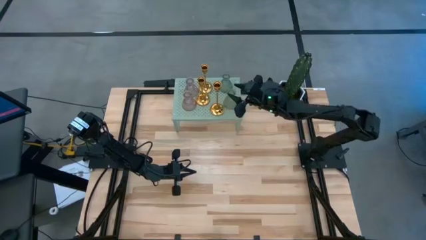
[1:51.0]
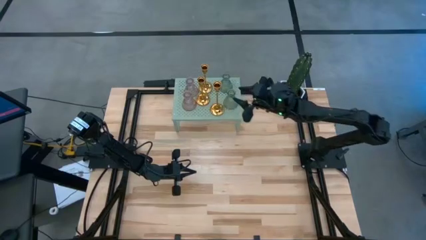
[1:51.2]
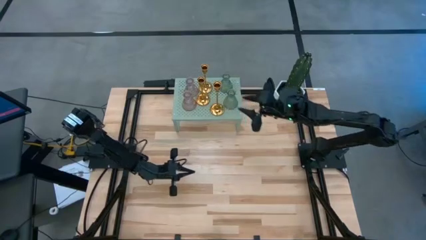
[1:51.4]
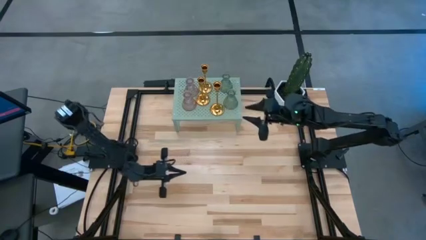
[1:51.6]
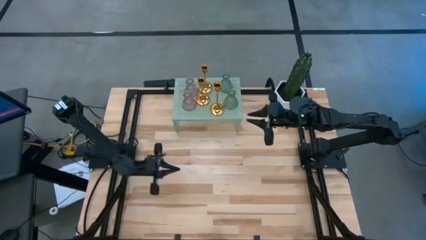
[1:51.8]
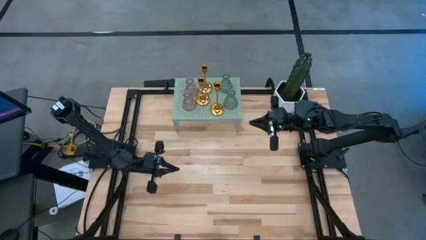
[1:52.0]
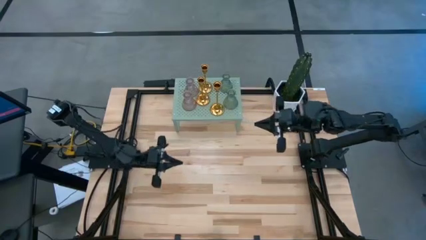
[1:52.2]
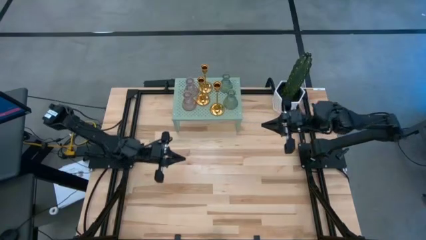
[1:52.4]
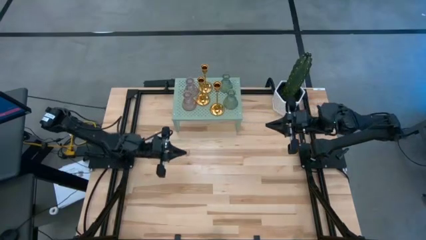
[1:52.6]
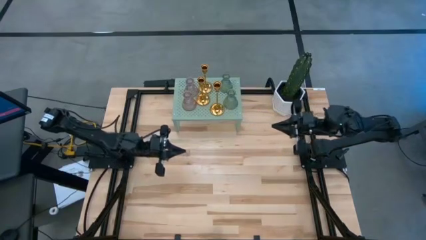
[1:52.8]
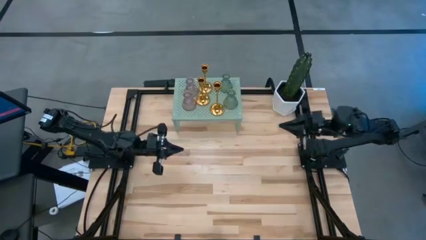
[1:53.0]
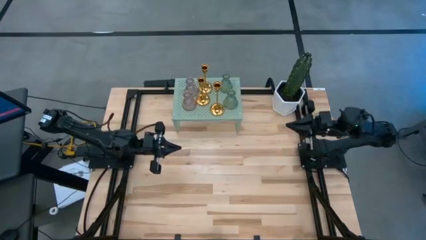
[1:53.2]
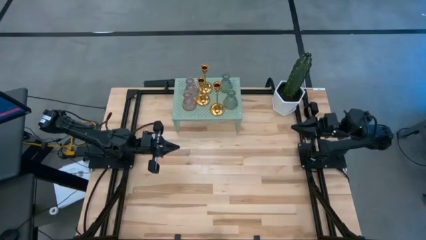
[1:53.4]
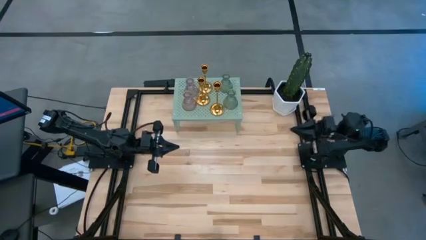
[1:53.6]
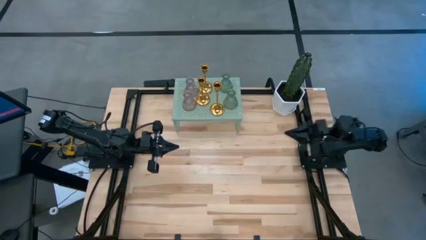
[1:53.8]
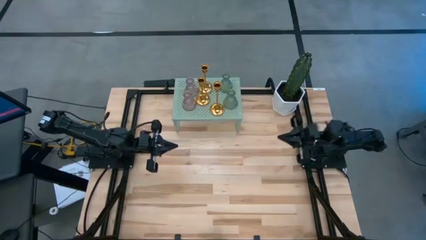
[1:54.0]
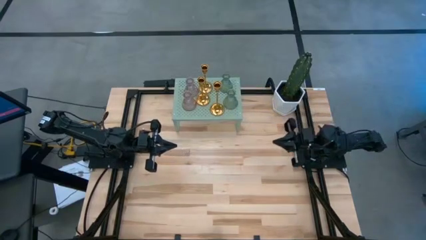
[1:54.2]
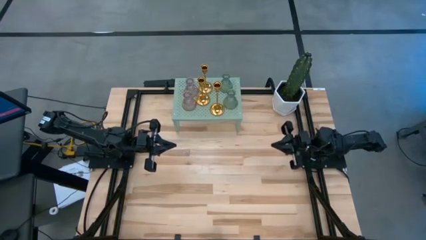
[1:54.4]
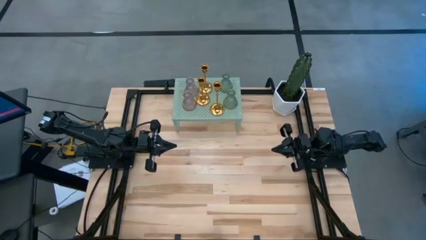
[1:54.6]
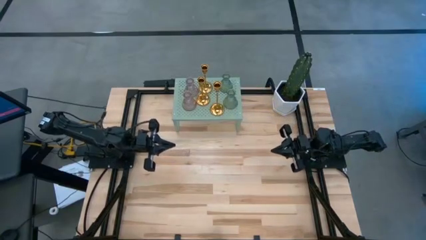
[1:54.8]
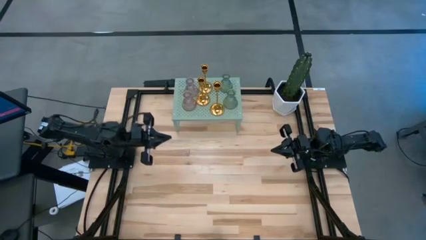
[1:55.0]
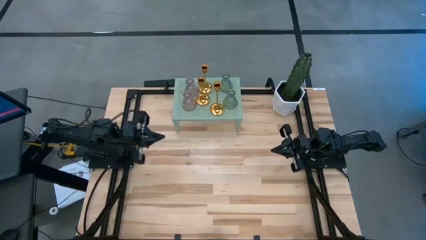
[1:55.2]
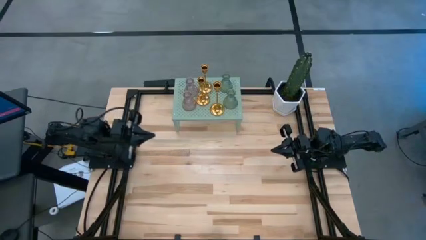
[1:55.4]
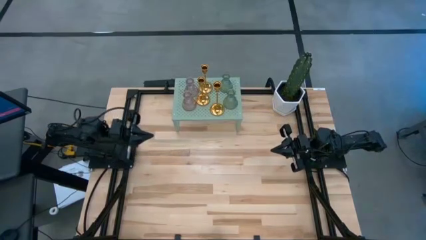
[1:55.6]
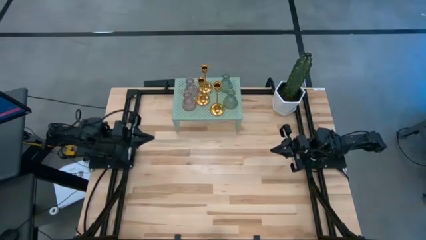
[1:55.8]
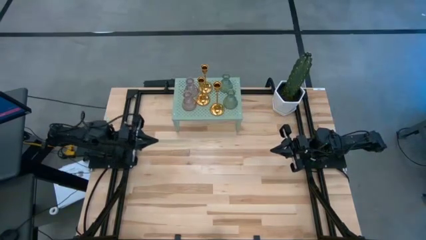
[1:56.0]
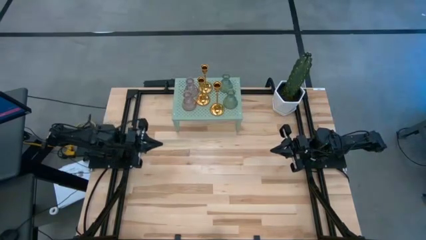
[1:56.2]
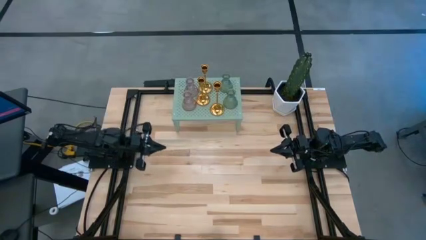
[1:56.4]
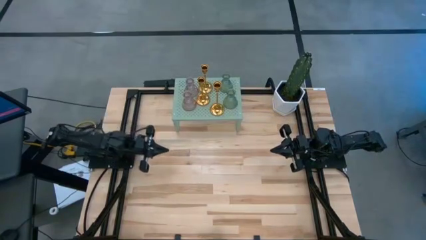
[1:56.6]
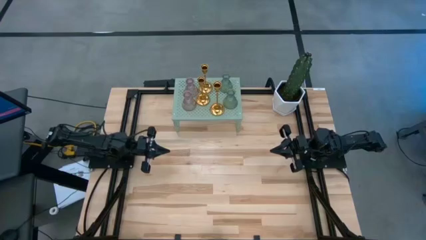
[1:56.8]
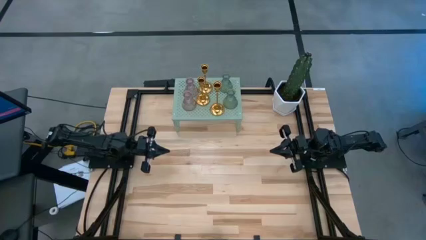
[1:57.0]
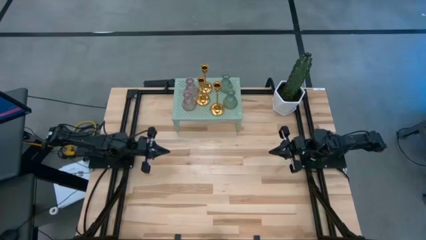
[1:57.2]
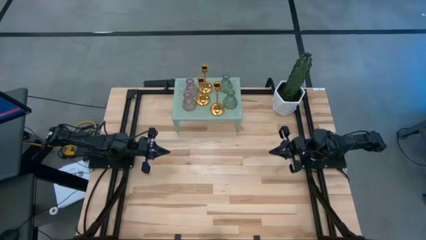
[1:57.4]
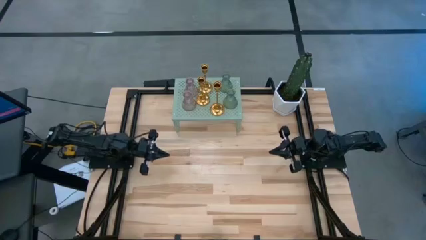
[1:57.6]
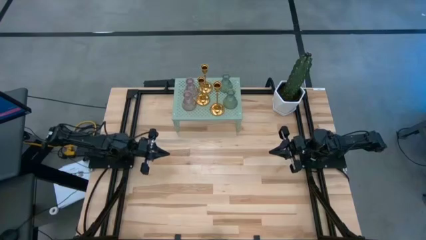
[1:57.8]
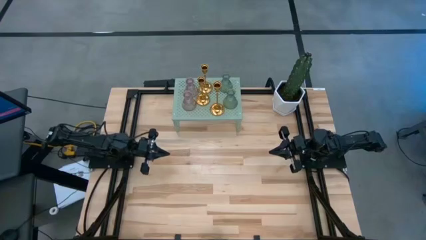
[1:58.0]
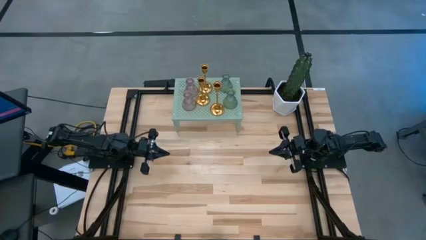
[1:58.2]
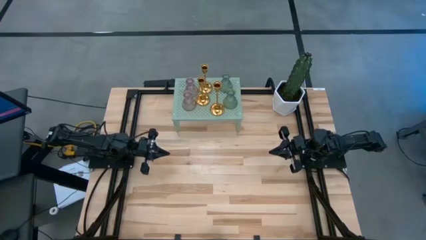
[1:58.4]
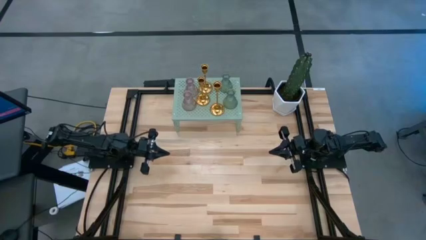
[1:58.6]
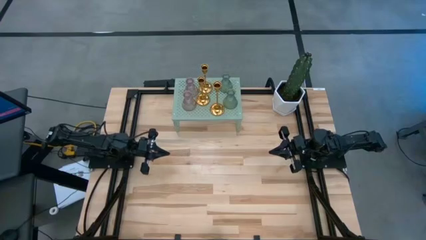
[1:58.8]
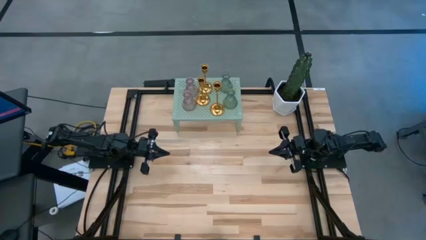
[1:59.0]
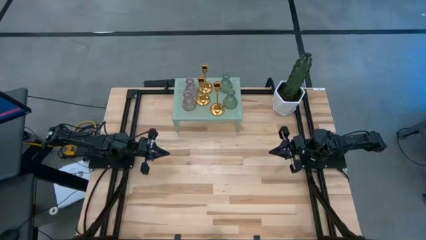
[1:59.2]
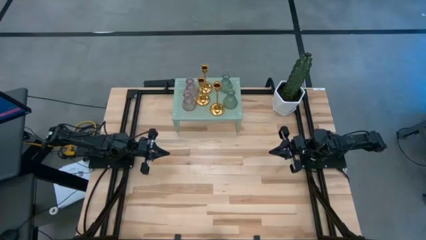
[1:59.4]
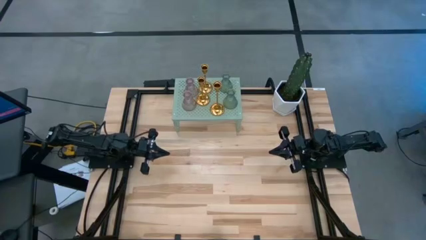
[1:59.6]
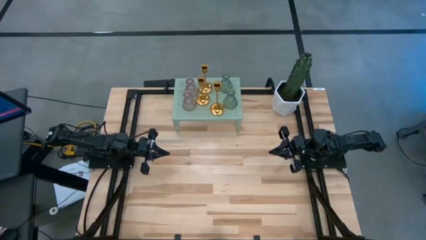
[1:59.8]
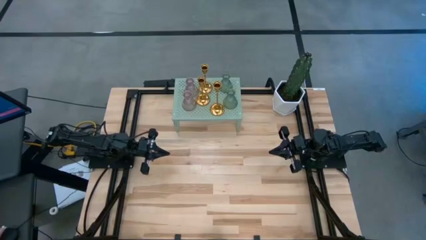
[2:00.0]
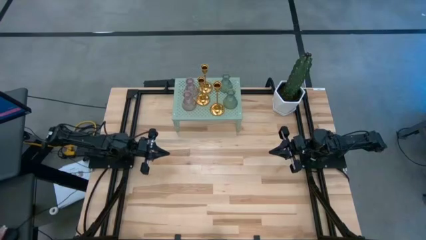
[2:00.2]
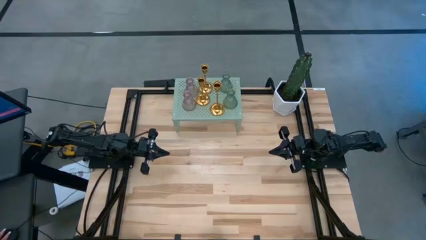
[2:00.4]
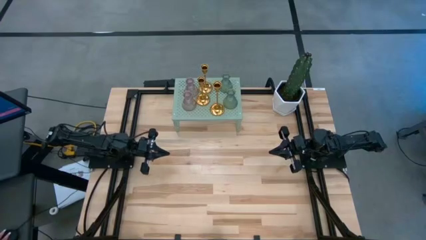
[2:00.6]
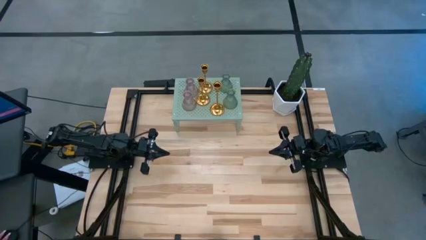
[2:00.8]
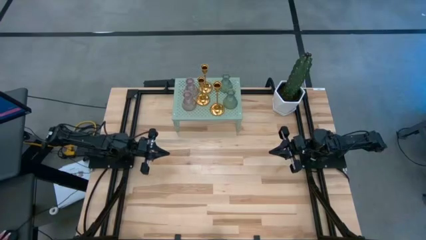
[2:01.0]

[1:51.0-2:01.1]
Task: Pick & Place candle stick holders
Return to Home Position
